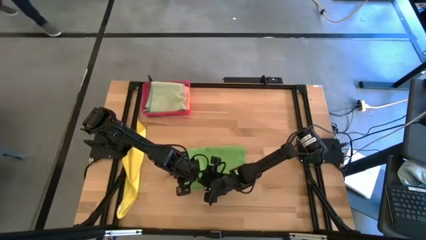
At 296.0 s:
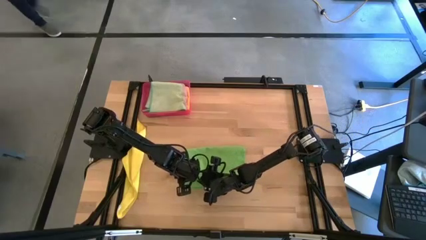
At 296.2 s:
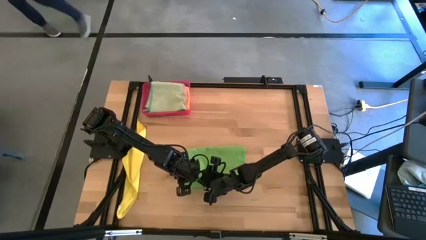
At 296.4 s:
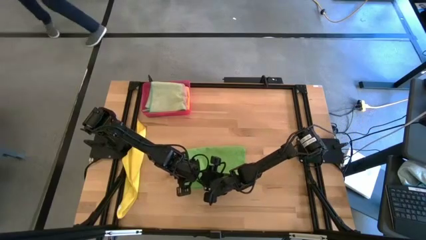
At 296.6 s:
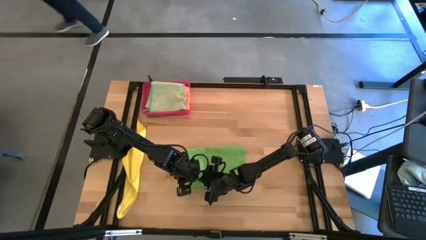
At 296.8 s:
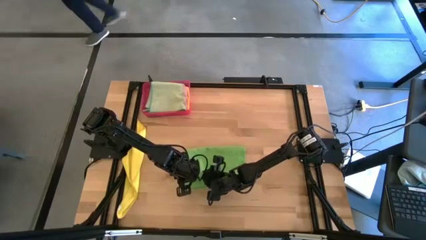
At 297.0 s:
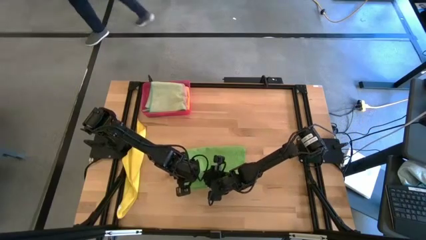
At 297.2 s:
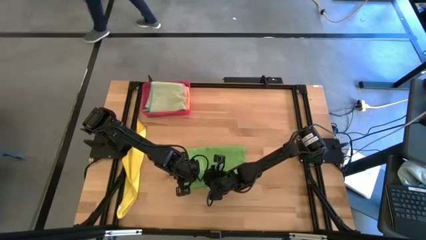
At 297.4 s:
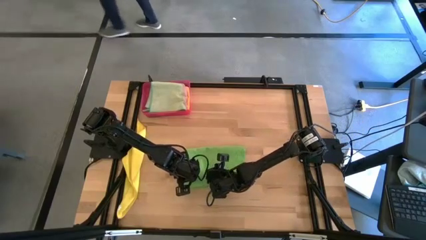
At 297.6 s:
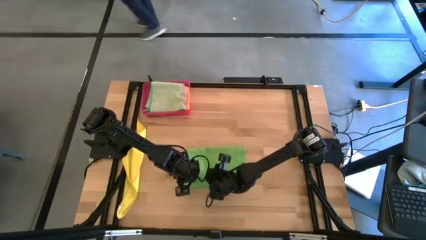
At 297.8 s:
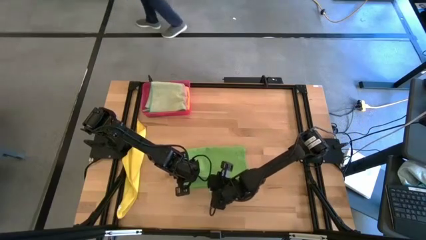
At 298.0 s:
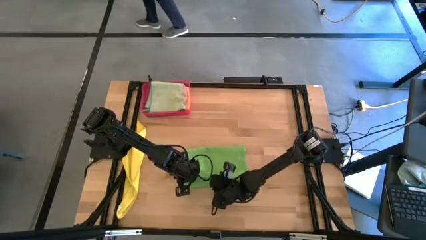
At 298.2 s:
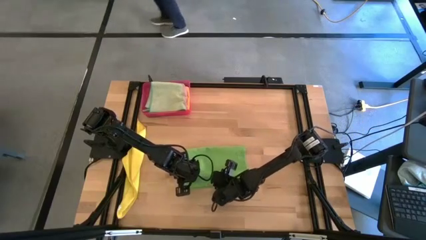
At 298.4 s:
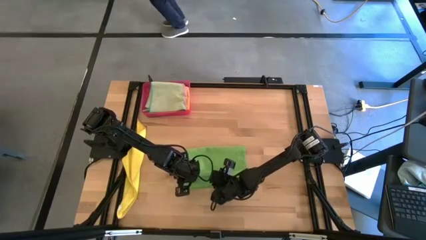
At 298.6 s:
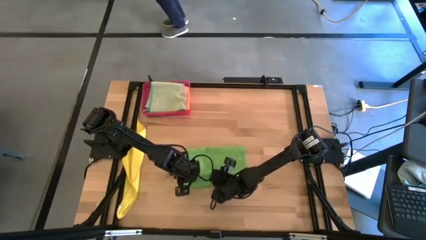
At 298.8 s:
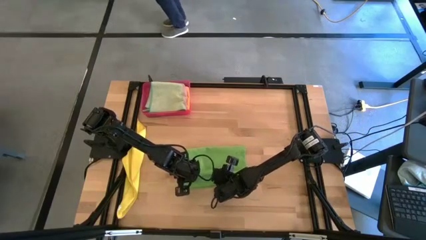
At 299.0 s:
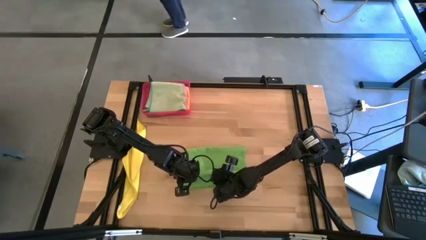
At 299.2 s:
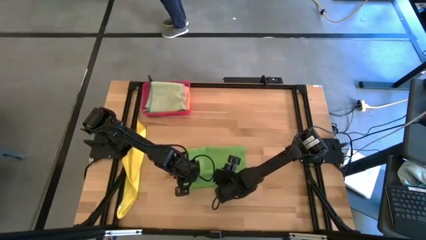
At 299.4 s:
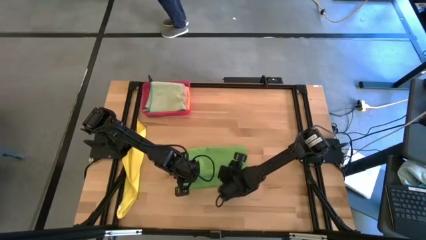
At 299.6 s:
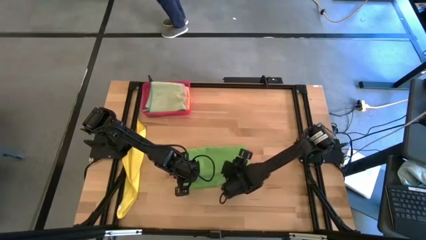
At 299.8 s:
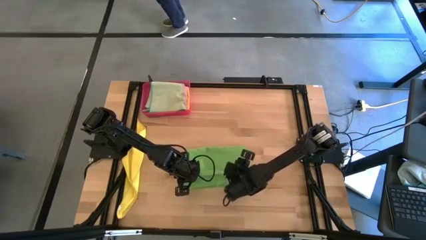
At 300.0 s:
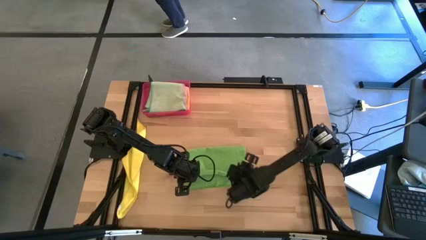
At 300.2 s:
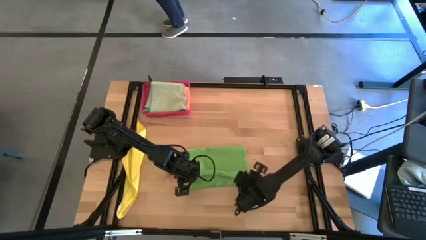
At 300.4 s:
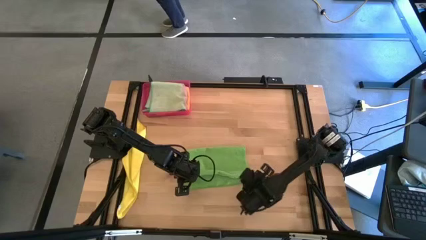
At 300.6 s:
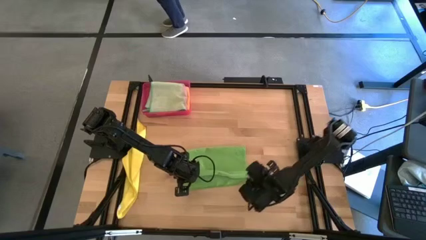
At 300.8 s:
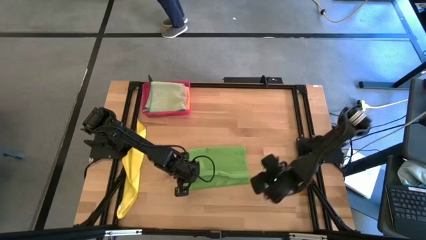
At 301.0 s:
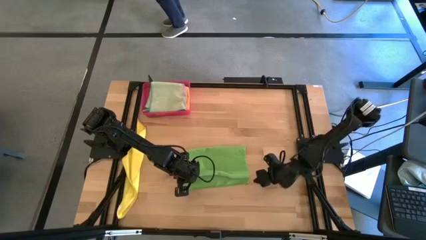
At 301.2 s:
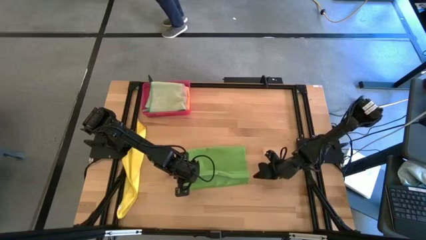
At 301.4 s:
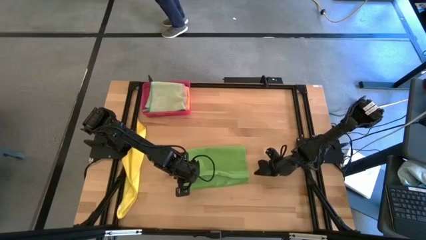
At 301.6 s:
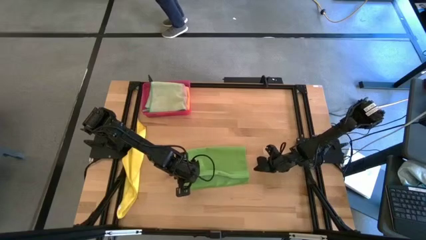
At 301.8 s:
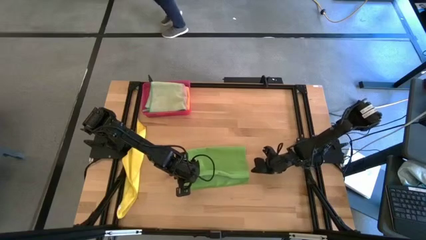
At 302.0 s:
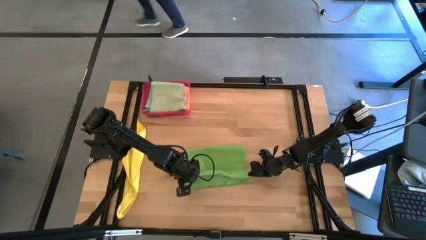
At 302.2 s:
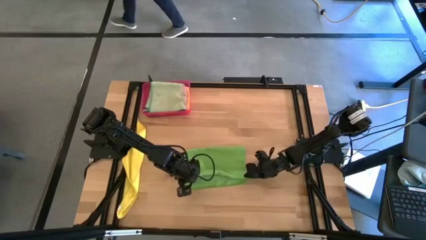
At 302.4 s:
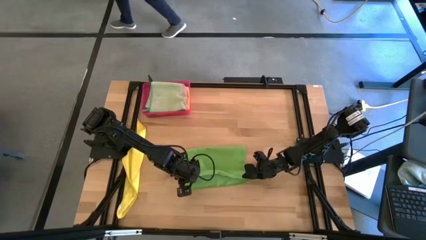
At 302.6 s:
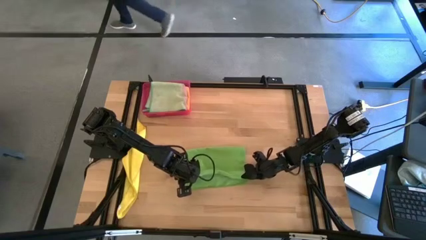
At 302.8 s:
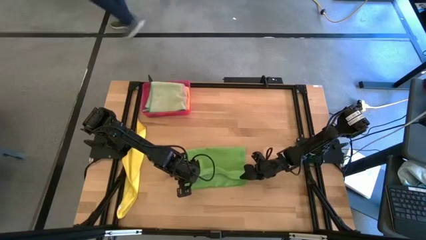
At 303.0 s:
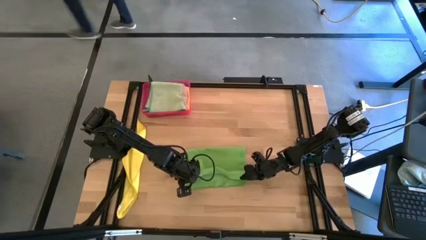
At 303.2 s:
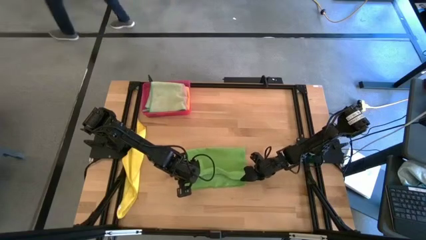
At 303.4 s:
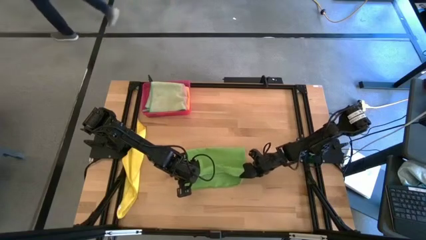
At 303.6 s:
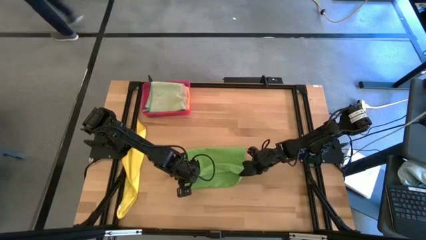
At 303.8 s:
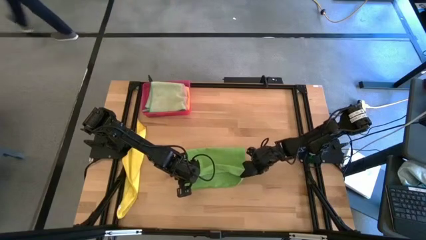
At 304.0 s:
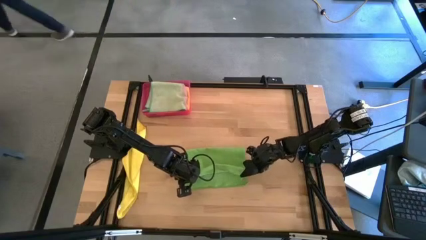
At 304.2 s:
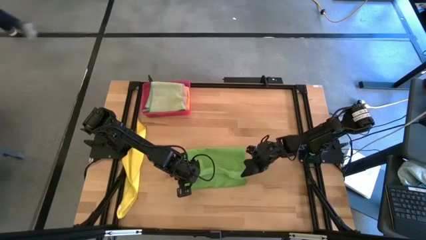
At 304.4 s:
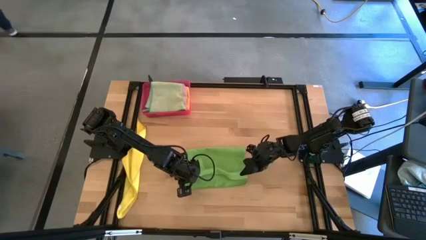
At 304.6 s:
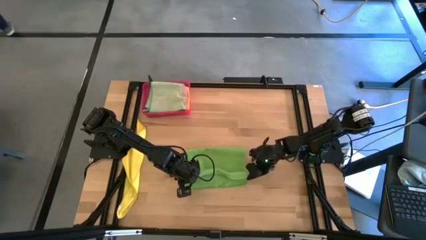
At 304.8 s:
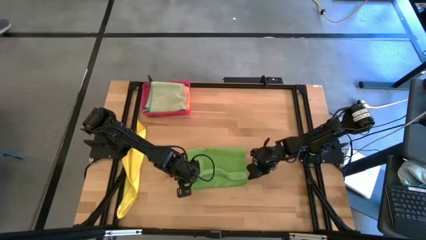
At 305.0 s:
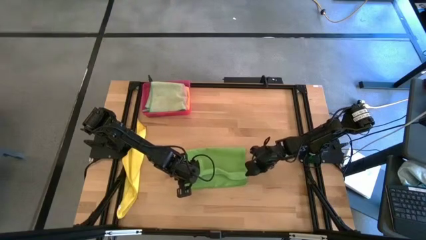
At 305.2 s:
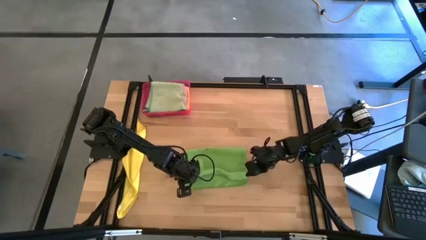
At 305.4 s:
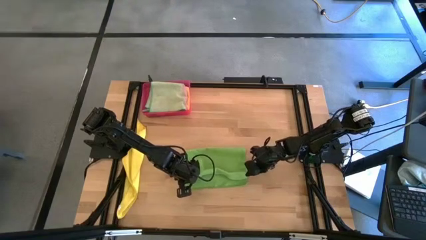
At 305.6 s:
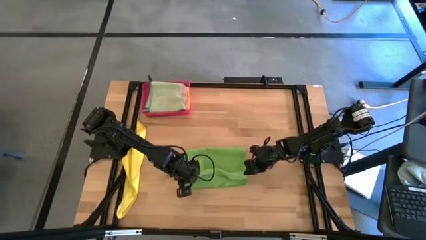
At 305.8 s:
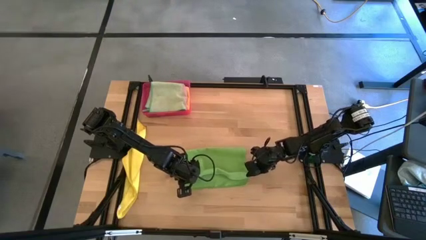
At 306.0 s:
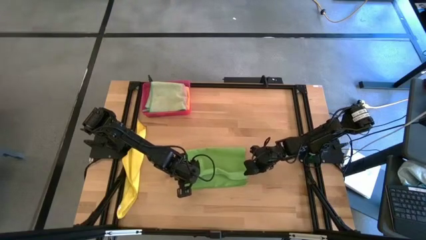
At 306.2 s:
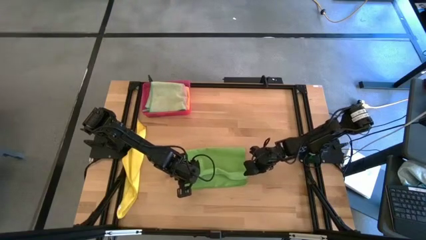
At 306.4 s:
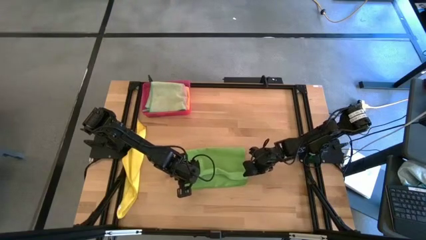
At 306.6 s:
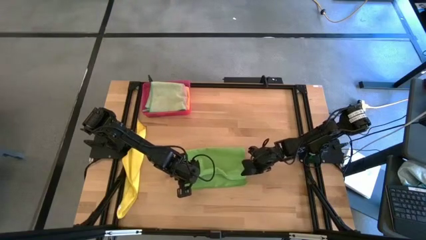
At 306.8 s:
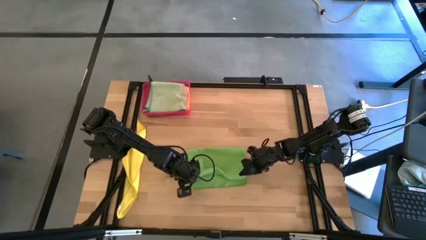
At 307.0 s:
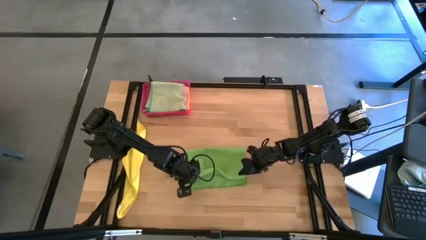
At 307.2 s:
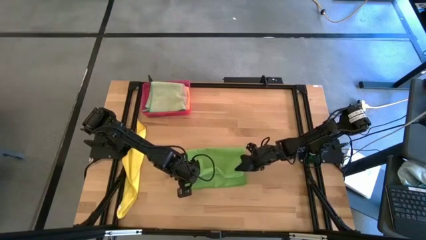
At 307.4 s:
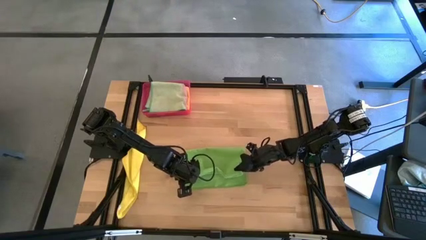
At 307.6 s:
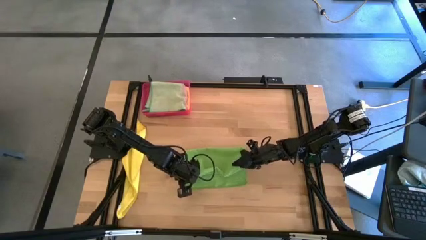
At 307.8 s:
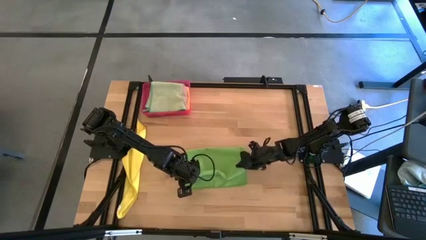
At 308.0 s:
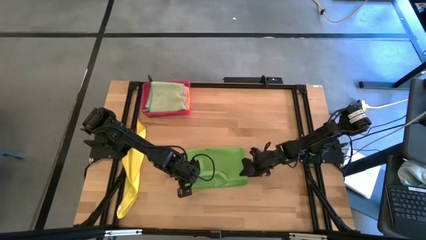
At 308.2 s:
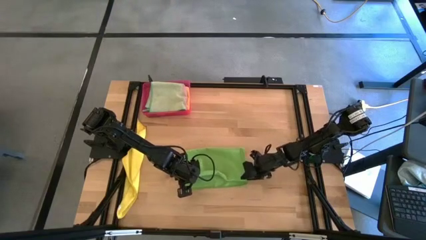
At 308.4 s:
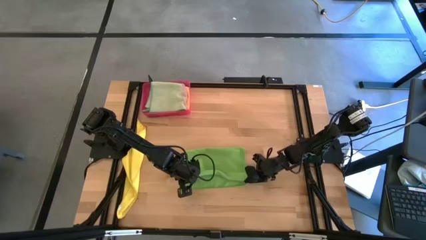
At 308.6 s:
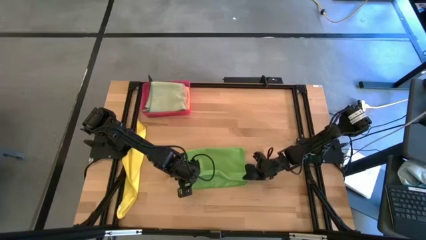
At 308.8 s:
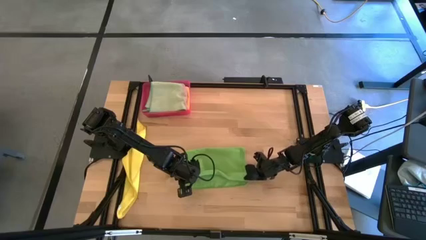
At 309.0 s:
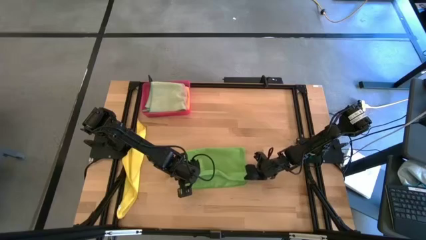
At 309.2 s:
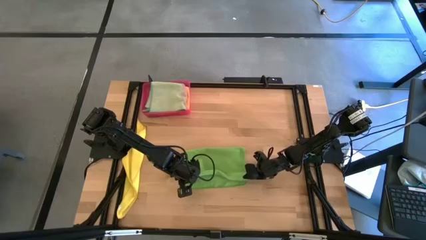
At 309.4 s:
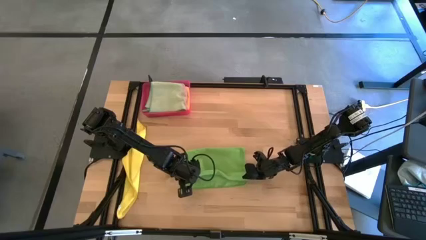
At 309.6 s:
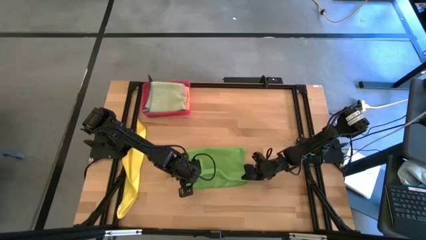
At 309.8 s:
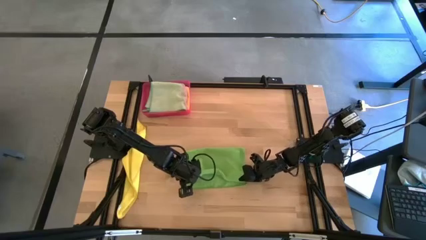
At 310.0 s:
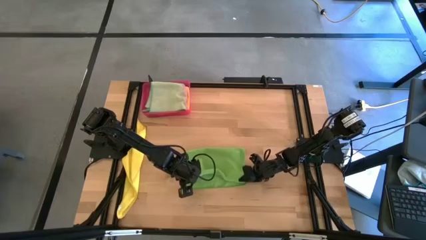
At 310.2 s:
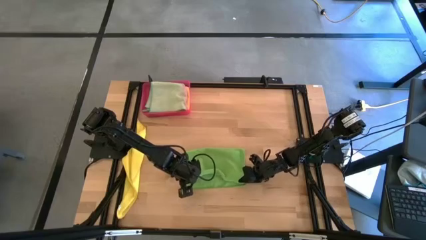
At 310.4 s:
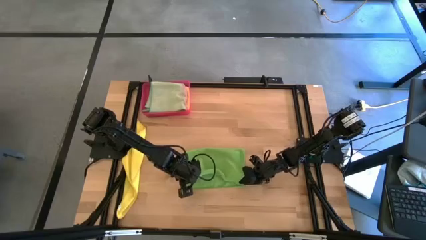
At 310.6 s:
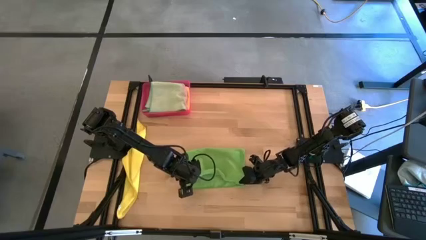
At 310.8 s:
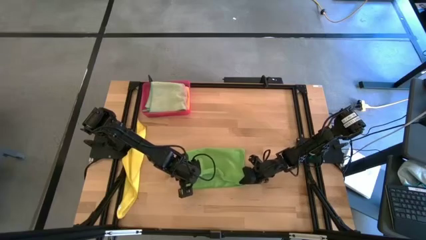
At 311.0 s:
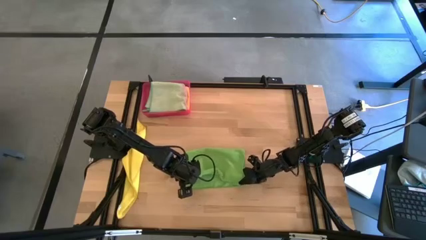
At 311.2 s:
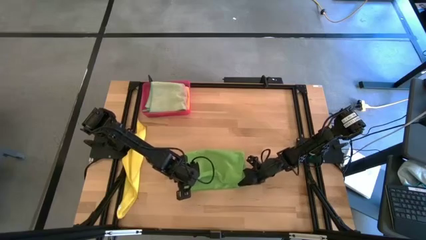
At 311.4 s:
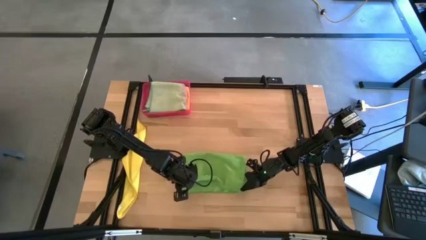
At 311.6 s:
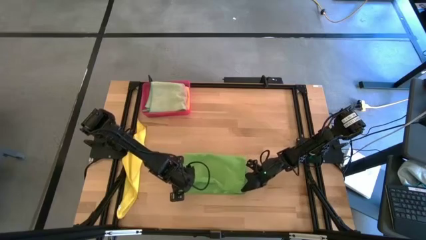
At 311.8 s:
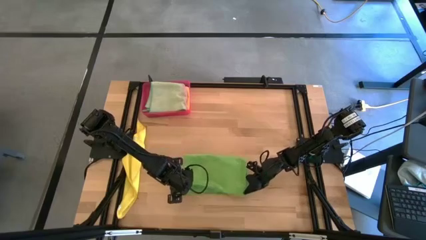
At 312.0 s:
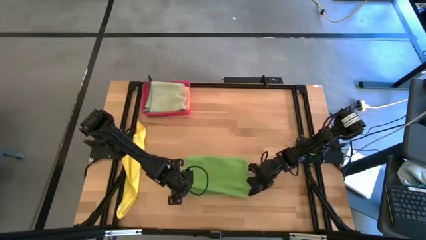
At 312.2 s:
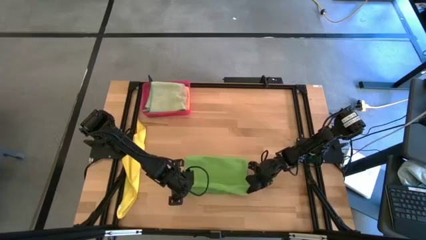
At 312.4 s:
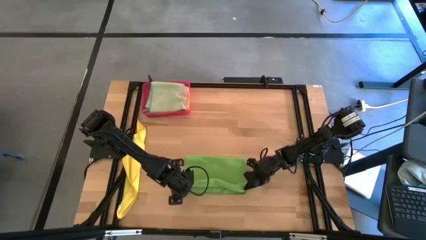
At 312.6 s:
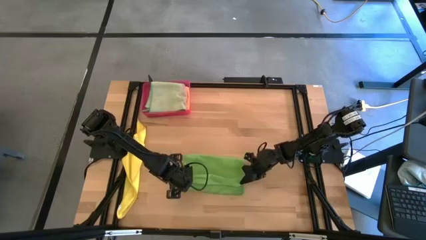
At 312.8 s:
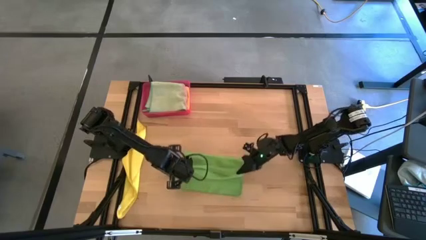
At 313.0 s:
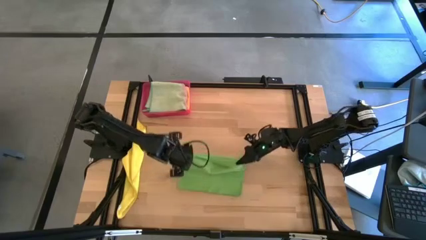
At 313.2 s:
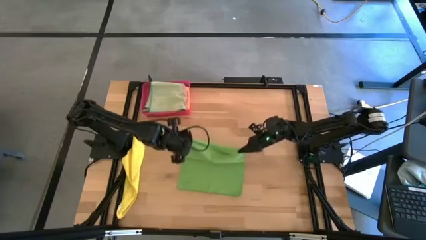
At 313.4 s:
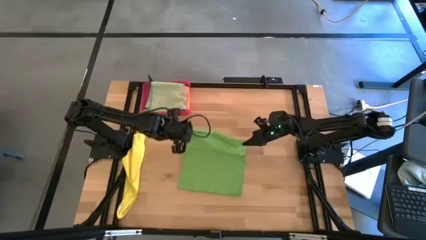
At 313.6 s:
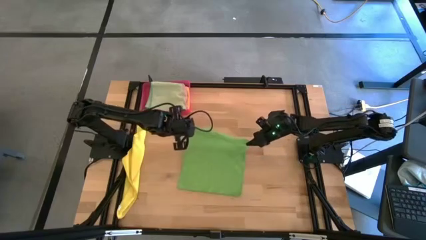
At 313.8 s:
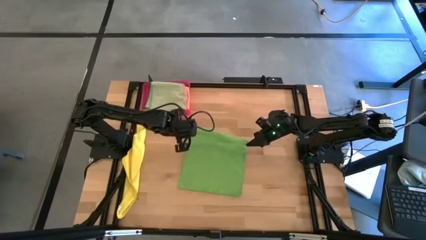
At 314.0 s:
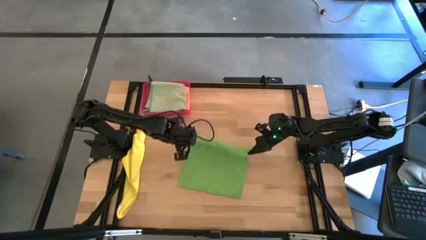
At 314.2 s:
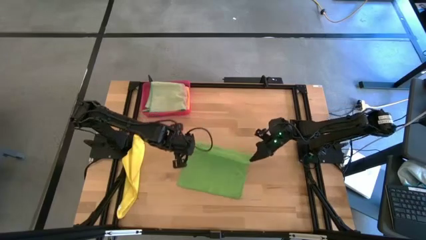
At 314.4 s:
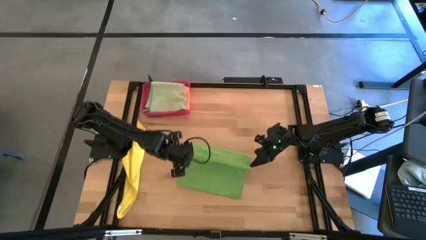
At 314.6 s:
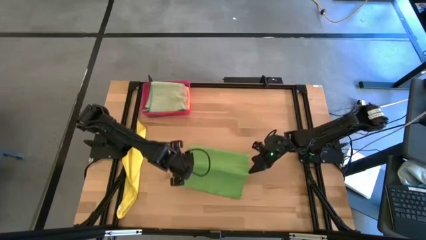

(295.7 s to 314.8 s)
Task: Fold microfiber towels
Fold the green microfiber towel
